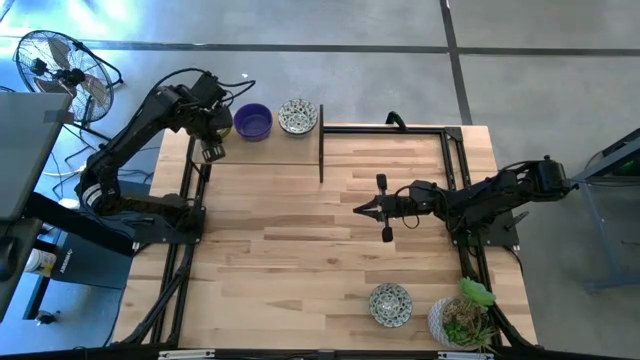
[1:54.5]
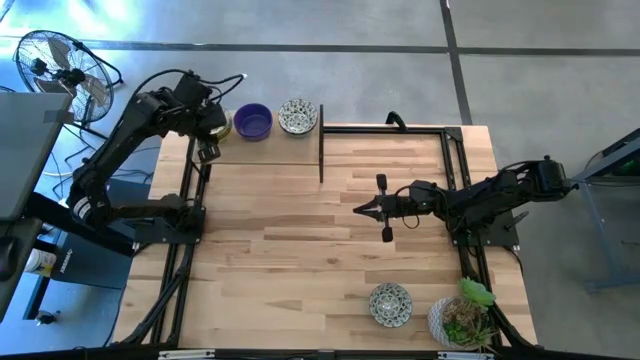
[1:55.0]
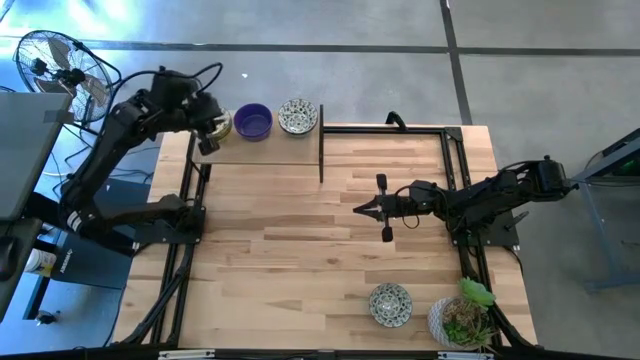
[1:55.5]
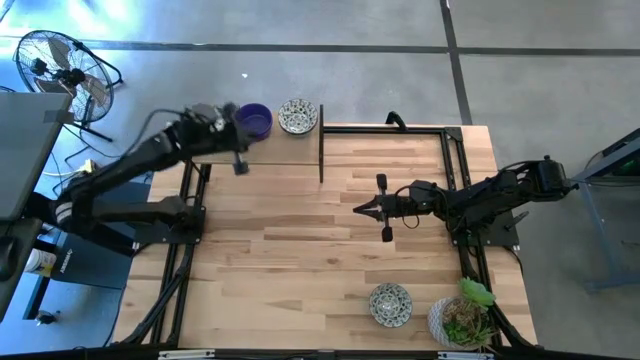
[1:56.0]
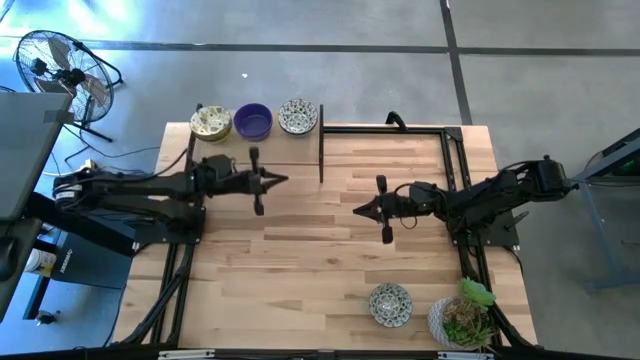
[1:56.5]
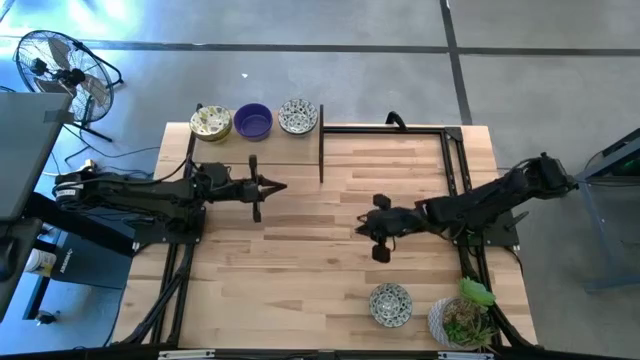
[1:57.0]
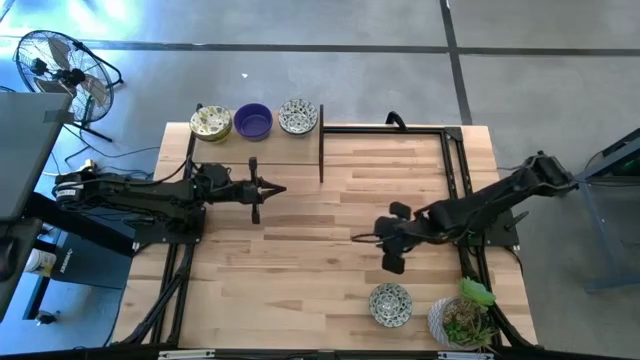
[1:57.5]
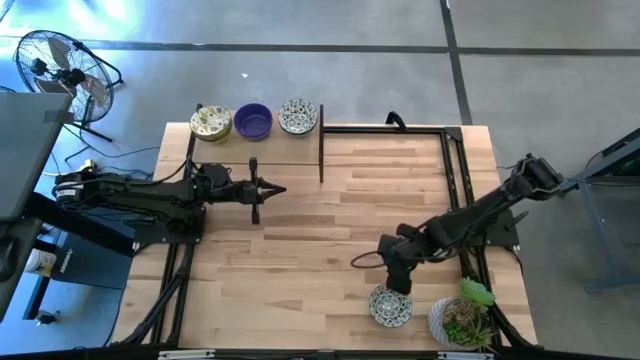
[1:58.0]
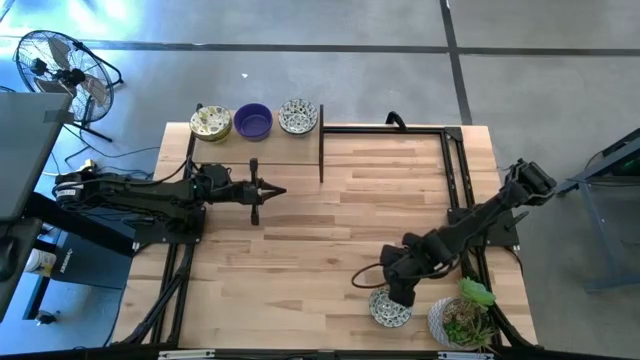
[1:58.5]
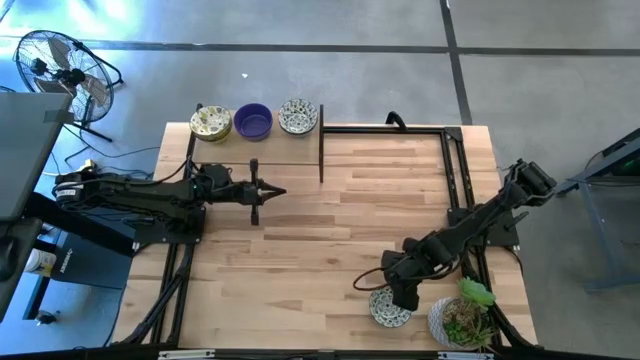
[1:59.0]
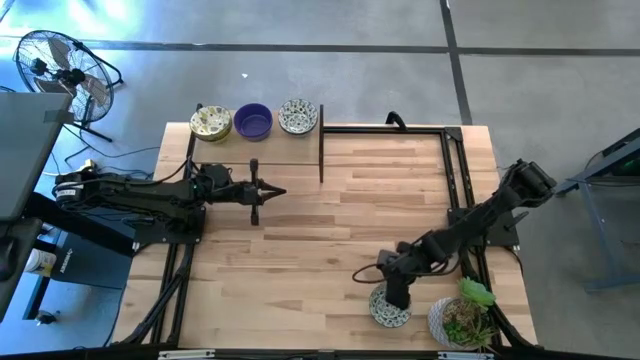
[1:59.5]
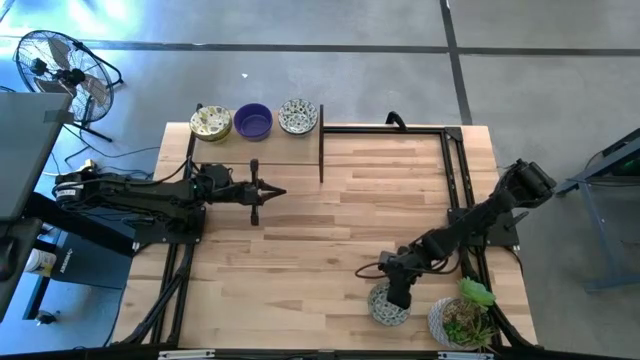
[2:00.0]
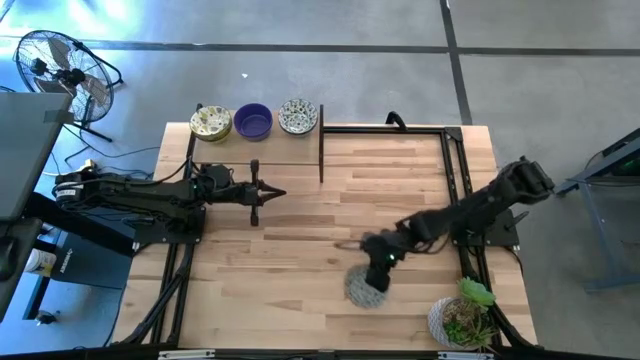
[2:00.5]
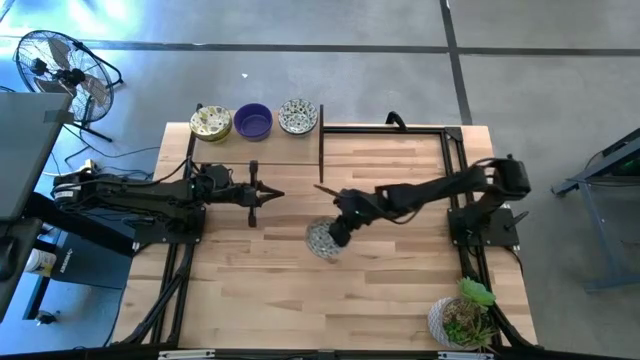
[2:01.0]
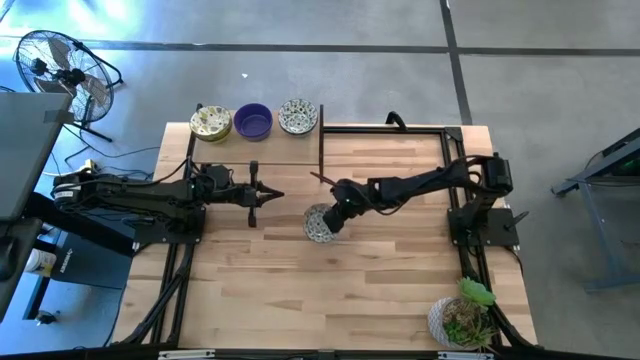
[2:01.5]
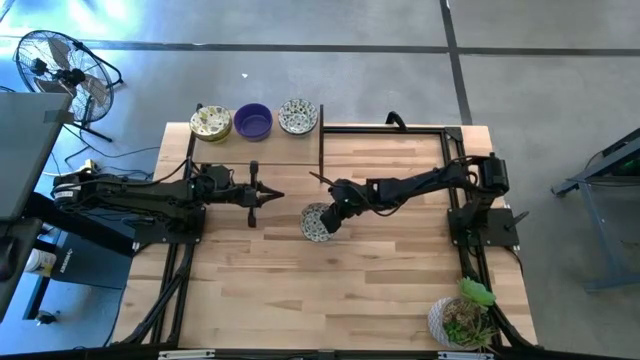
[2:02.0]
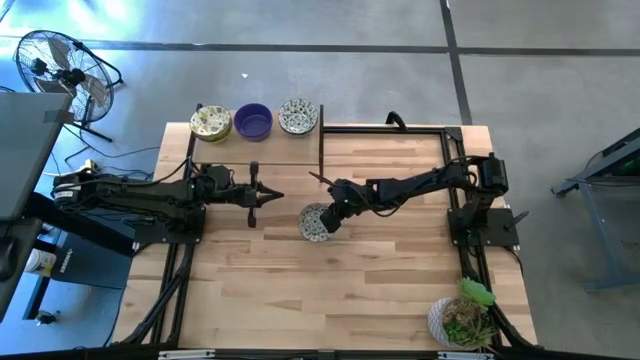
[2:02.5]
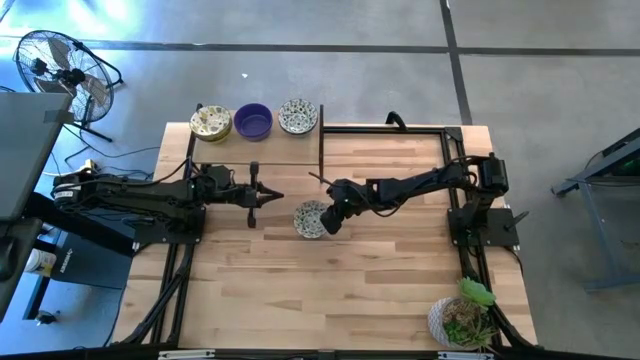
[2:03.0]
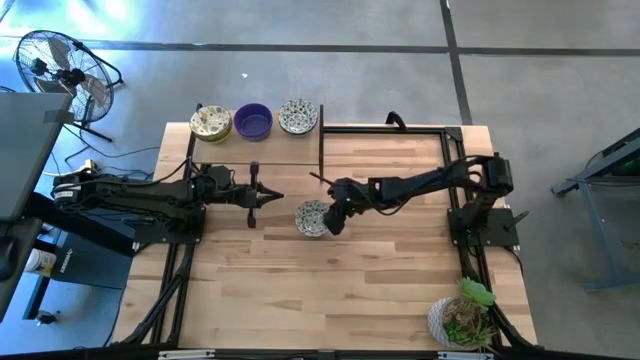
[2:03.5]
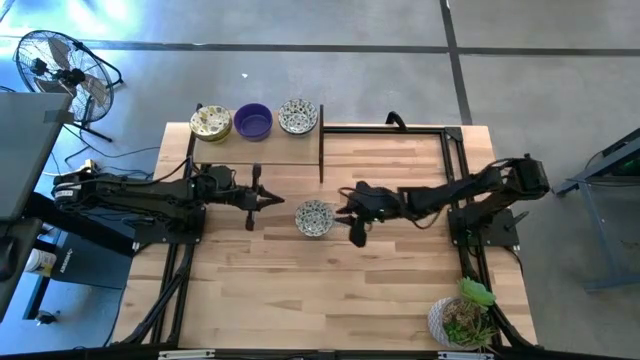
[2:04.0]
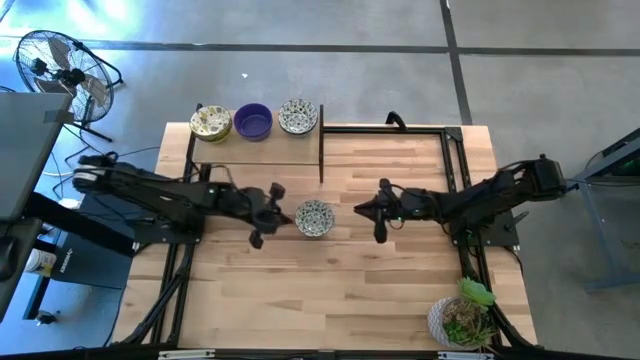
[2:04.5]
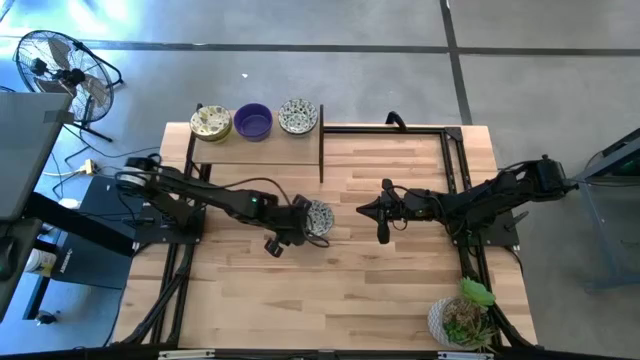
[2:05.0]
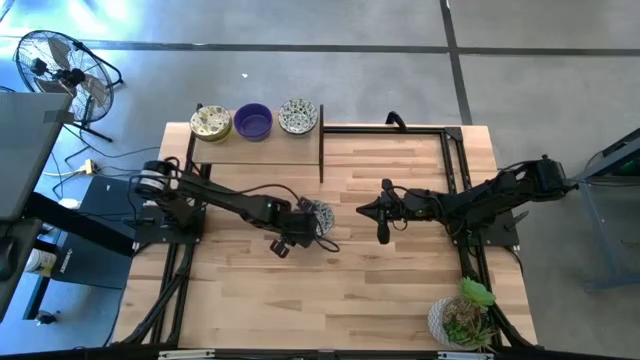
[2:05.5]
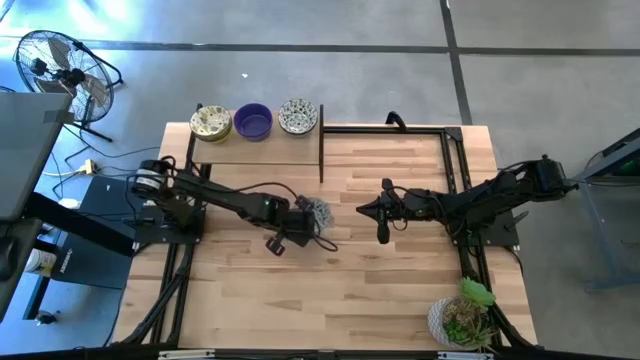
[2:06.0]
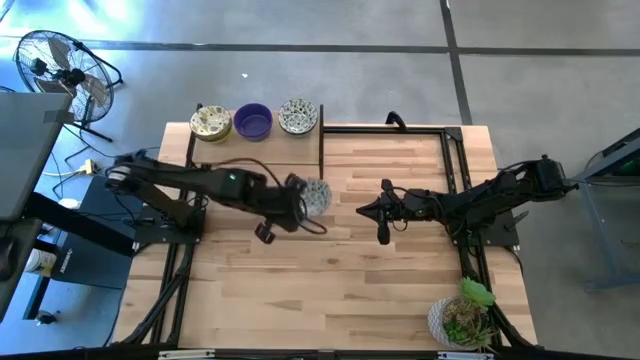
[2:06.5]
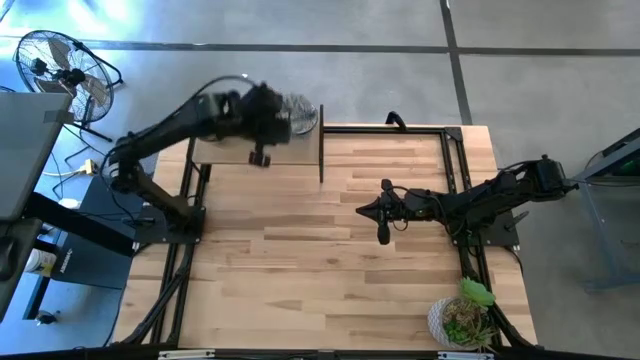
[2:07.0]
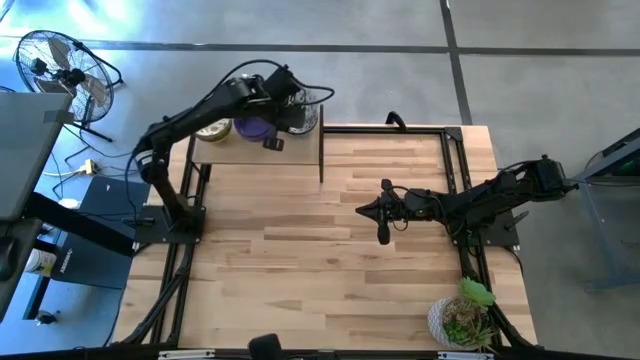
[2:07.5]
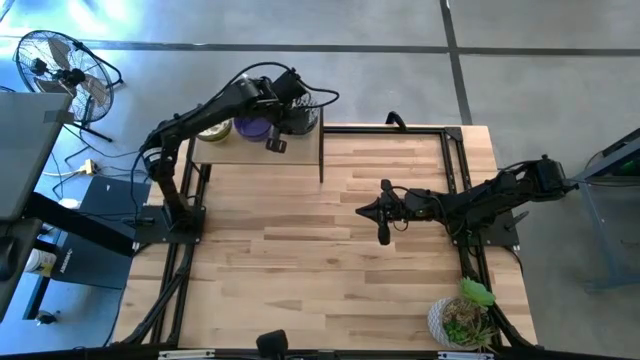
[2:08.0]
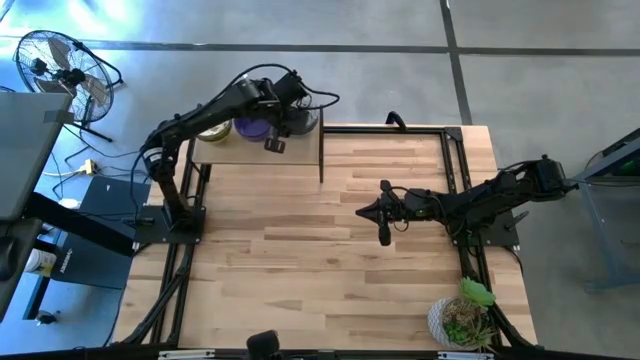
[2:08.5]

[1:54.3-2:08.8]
Task: Pick & Place Mini bowls
Stack the blue and white patterned bowl on the blue and white patterned bowl on the shelf

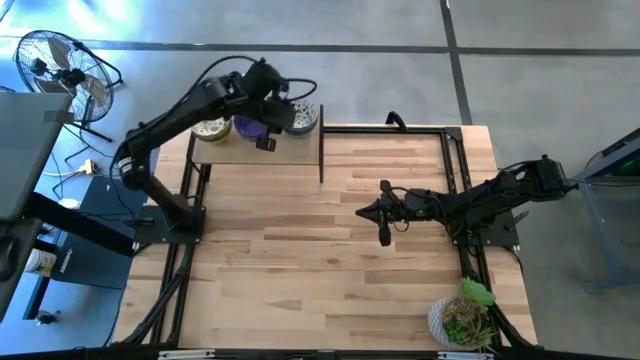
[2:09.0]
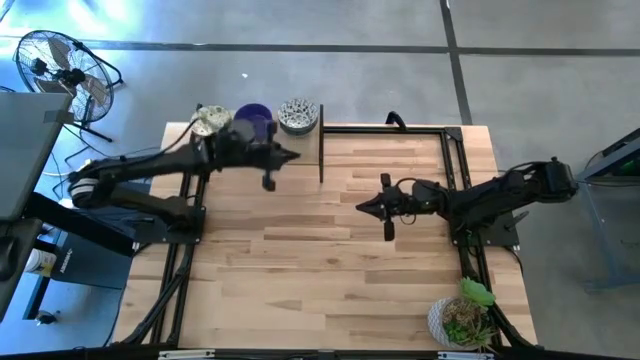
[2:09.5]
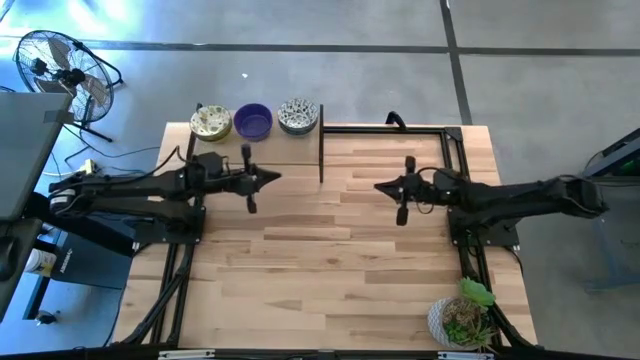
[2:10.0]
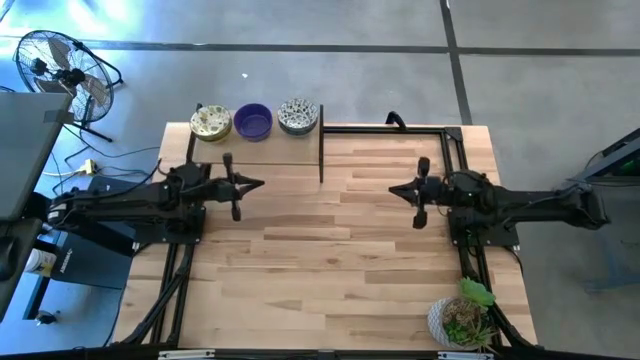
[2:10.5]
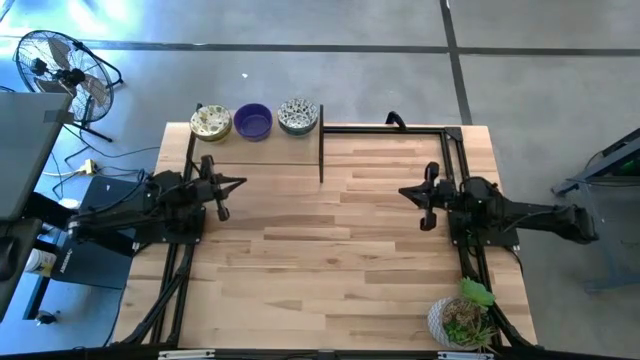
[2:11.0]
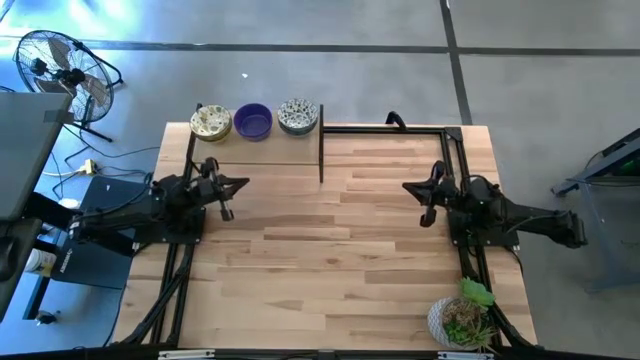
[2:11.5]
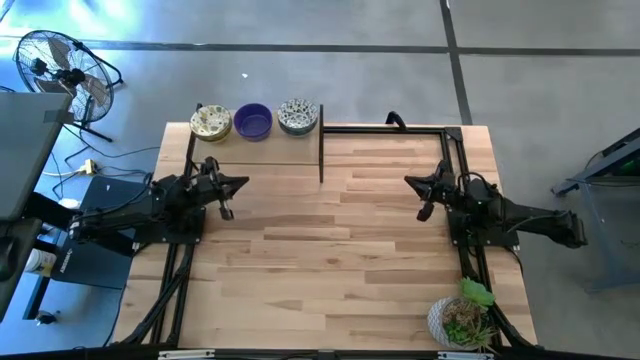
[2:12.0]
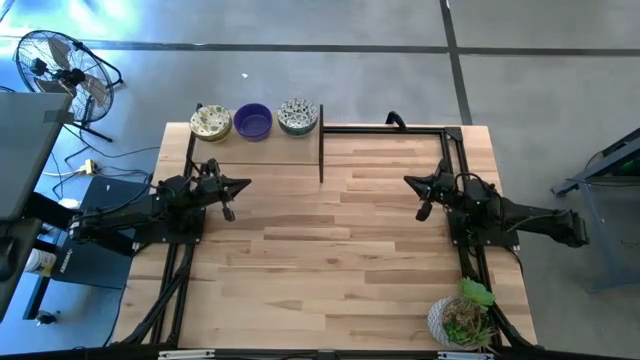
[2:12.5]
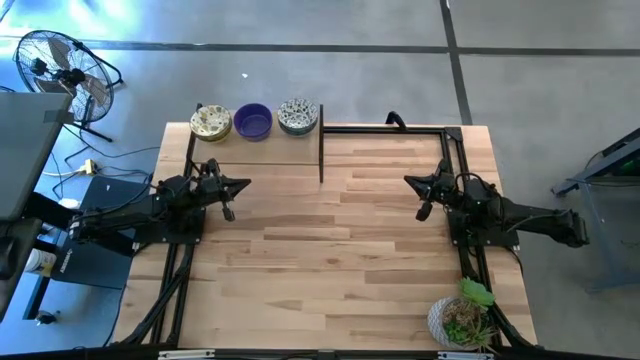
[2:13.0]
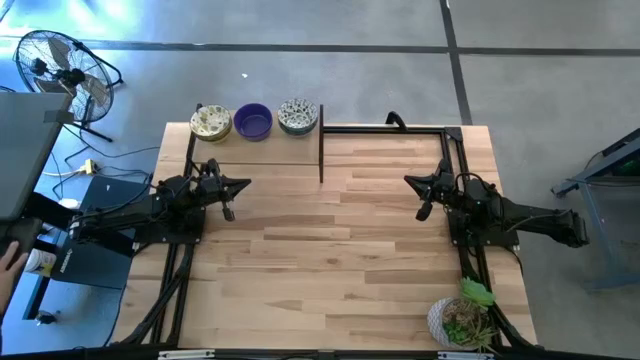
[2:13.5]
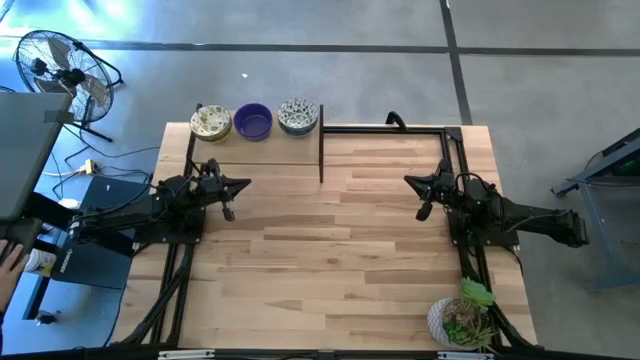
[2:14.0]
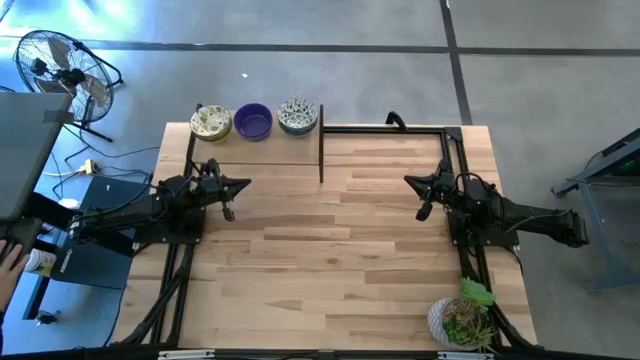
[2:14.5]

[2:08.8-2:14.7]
Return to Home Position
